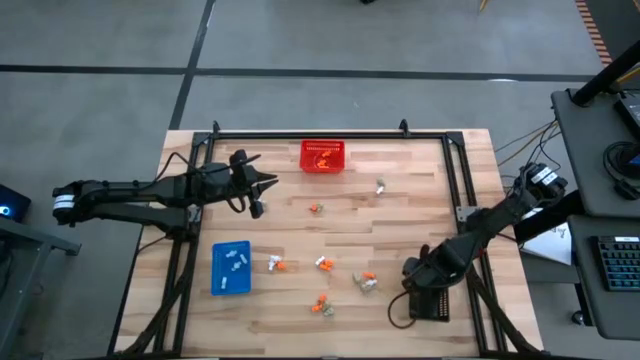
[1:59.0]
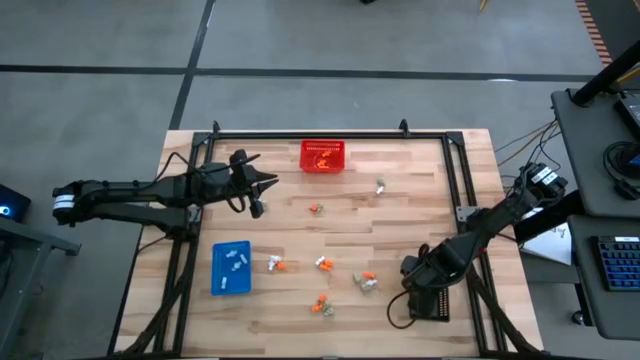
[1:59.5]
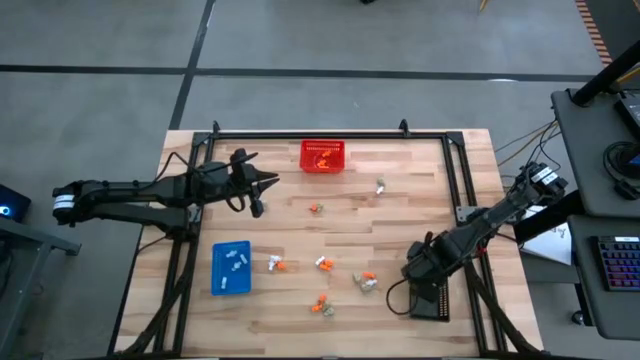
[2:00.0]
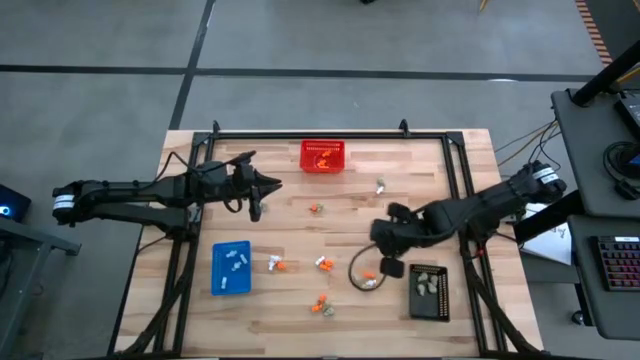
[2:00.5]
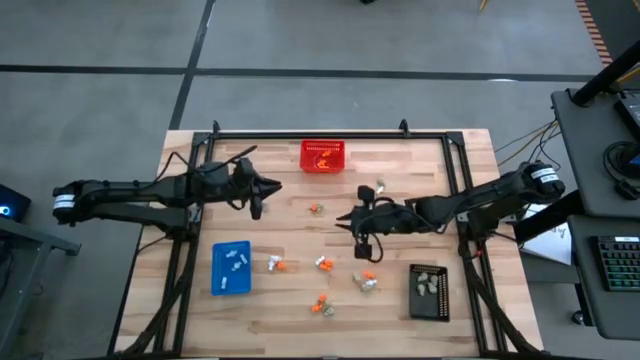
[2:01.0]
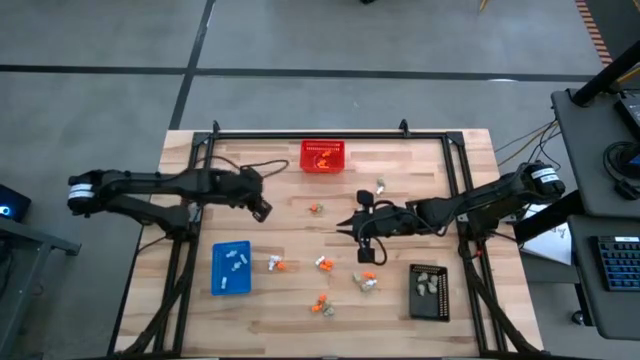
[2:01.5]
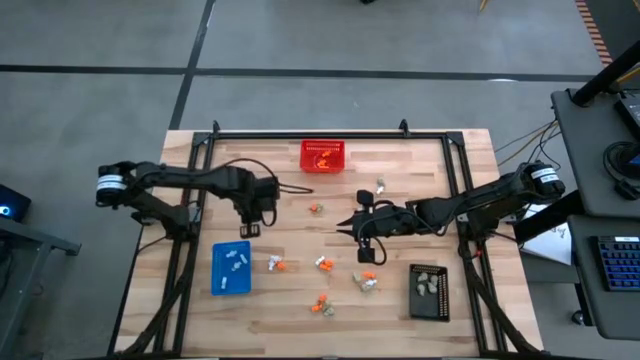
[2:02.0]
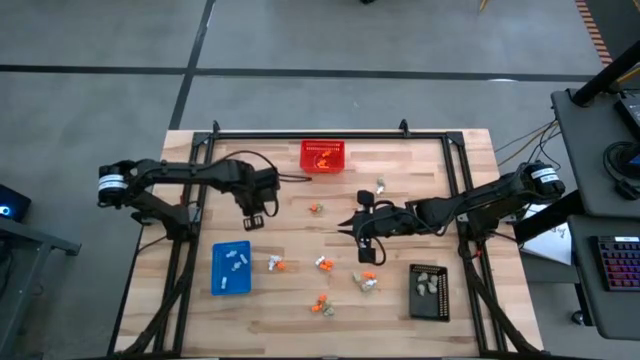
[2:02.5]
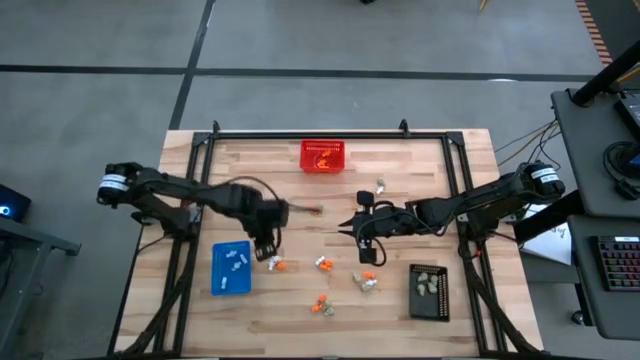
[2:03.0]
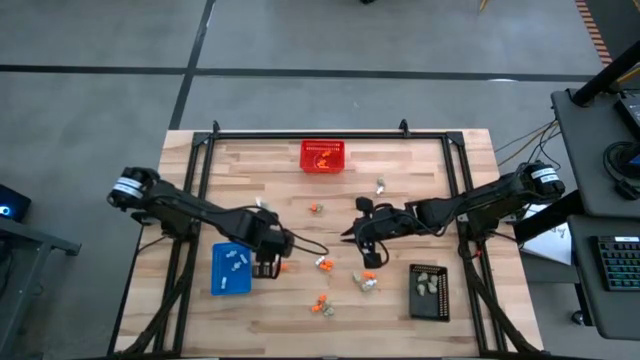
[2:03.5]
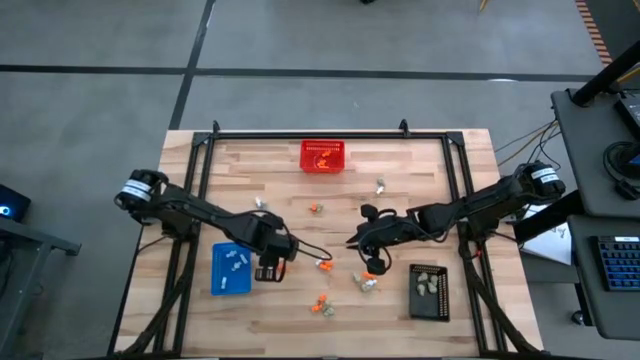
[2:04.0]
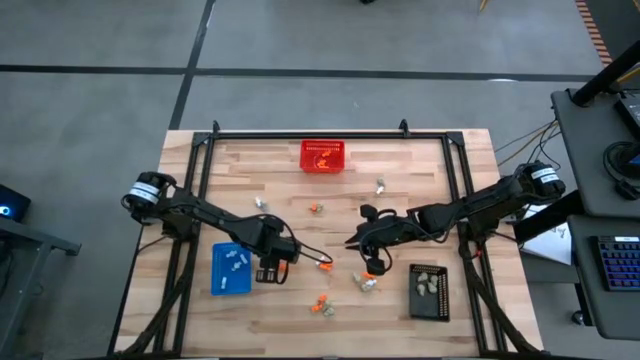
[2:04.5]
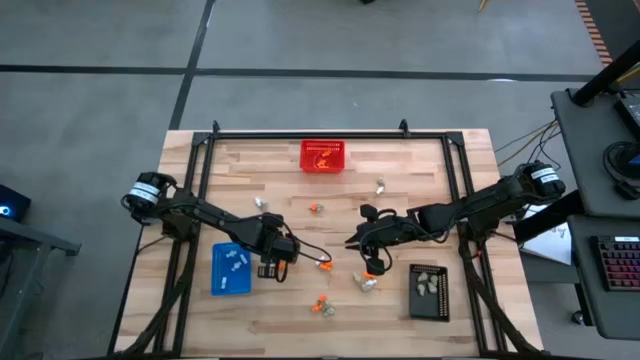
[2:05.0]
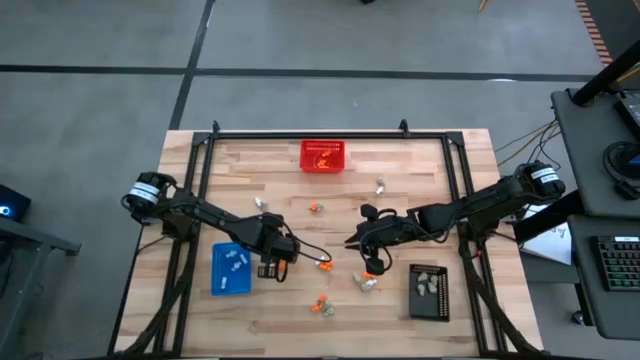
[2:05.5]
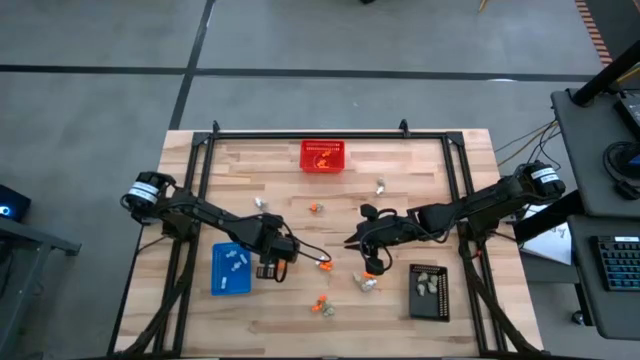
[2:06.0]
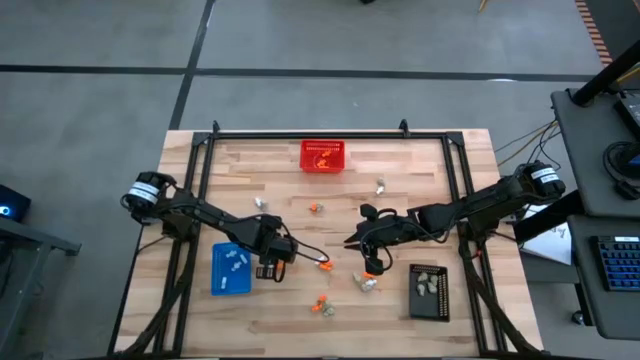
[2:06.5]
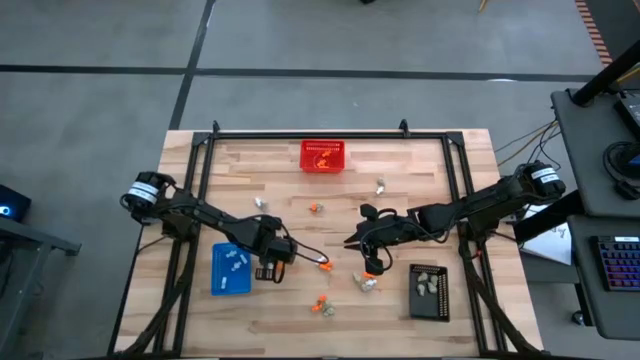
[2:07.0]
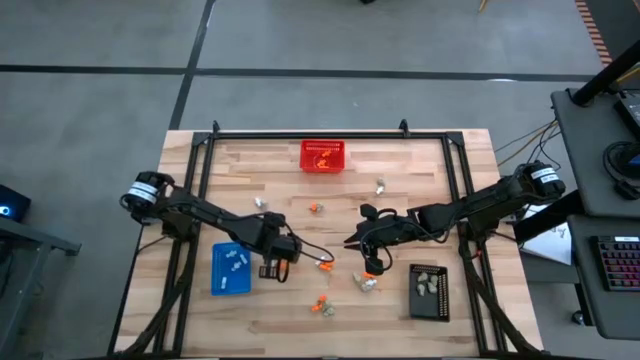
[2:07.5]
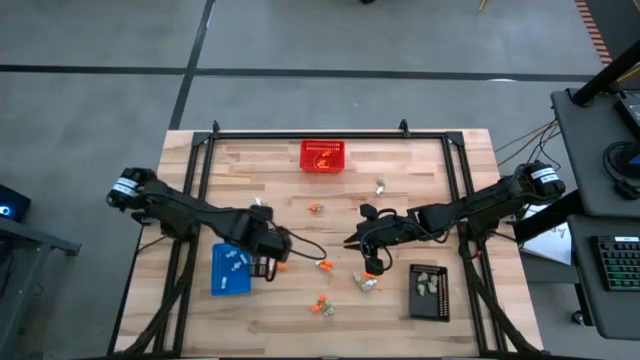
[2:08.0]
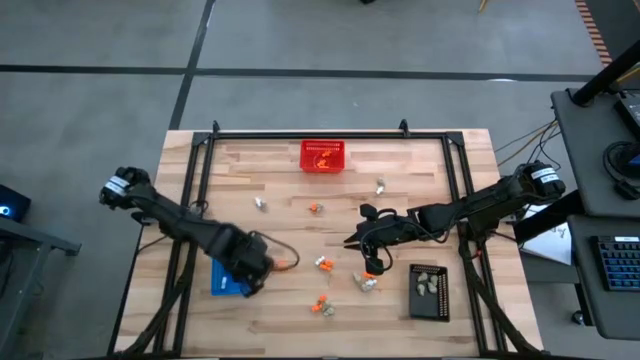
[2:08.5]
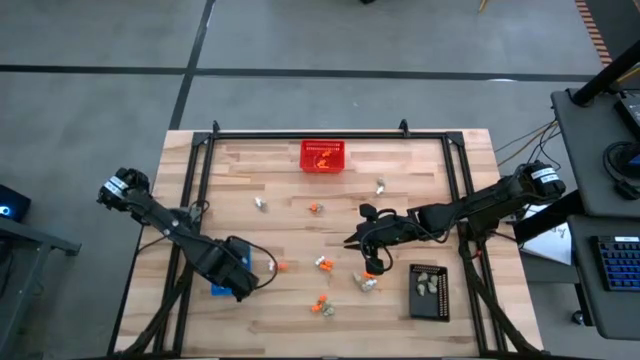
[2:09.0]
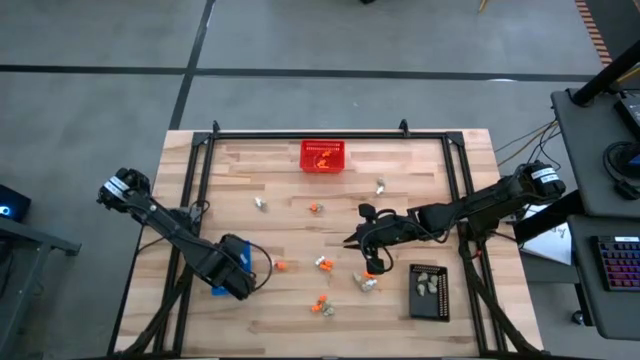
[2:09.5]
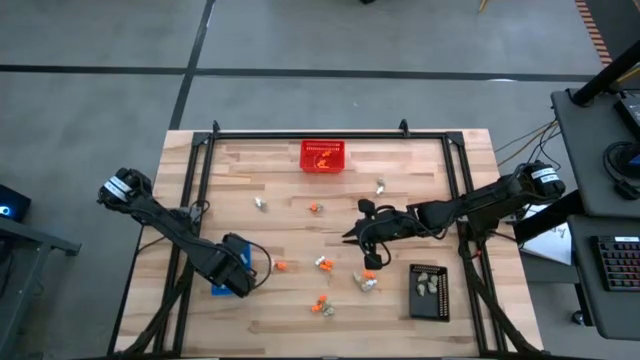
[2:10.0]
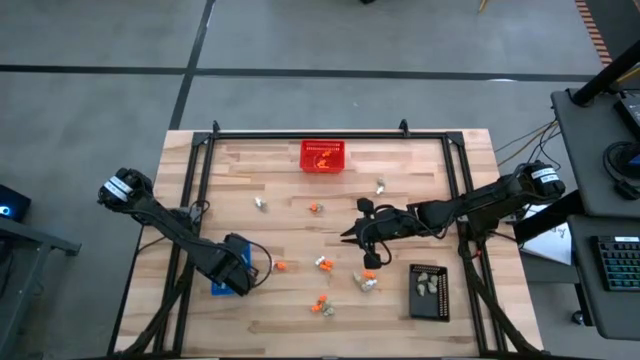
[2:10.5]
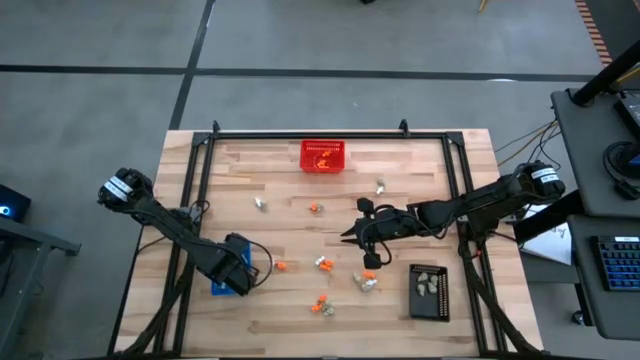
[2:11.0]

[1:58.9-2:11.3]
Task: Sort Halloween decoration
Put the white skeleton toy into the blue bin

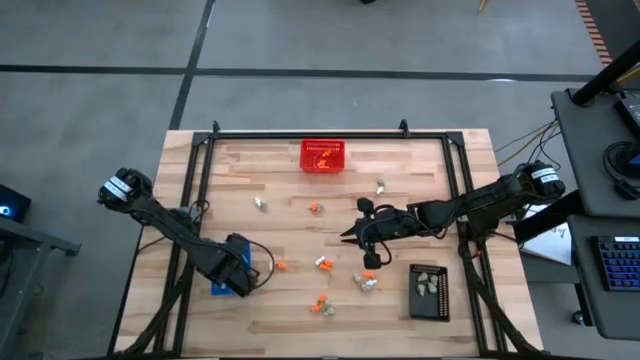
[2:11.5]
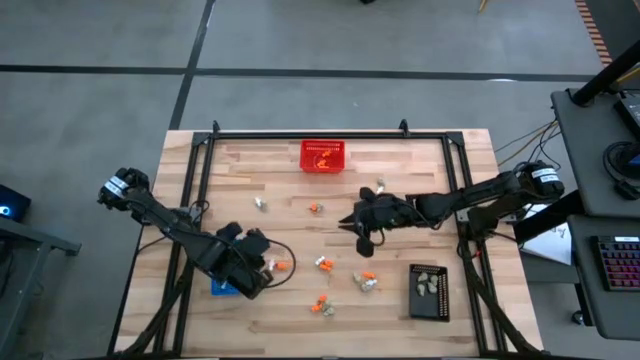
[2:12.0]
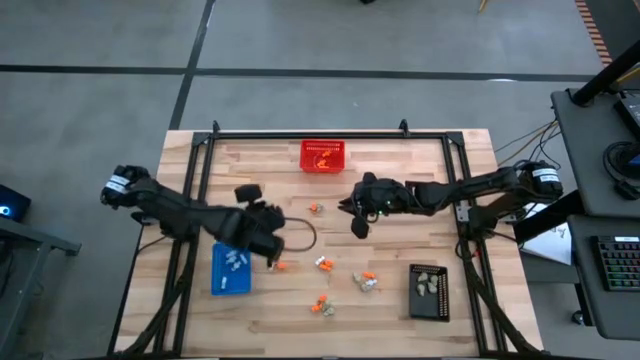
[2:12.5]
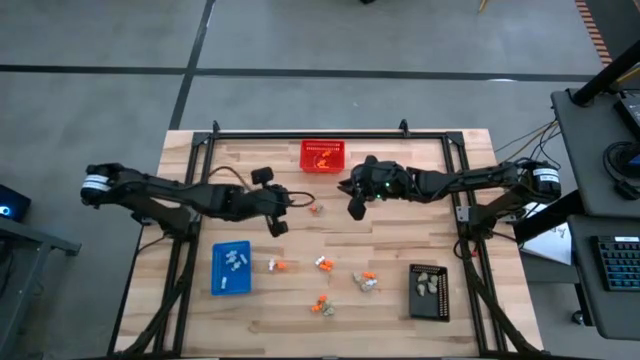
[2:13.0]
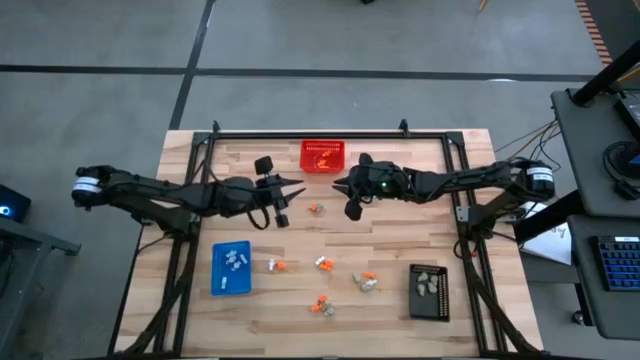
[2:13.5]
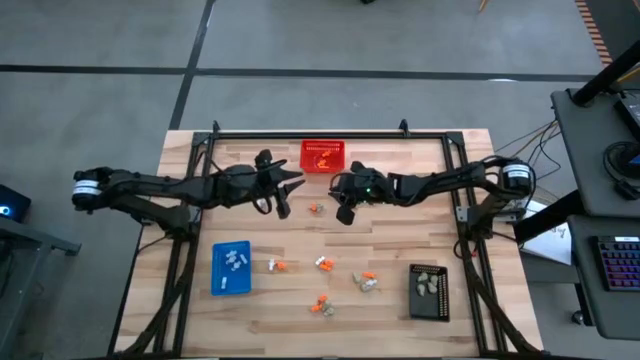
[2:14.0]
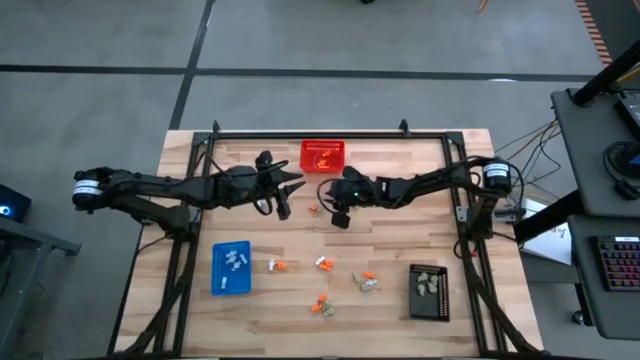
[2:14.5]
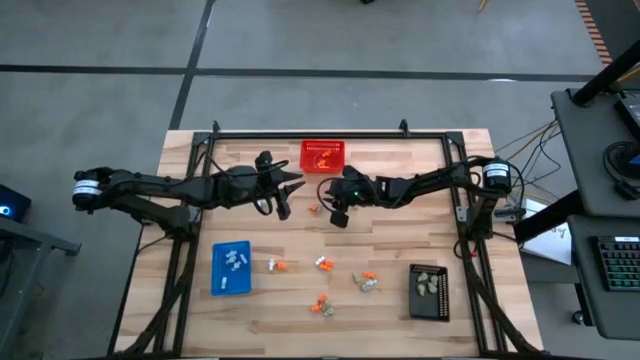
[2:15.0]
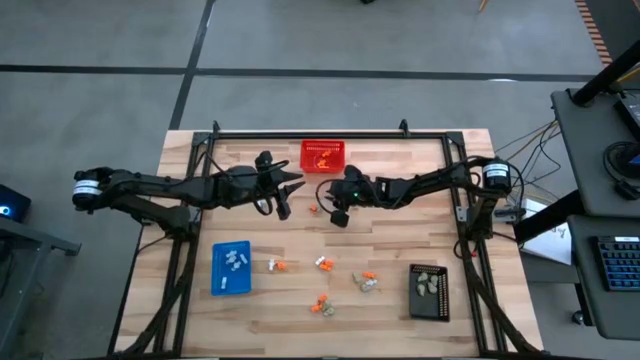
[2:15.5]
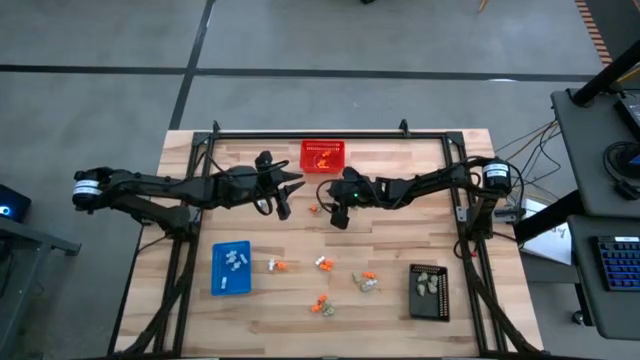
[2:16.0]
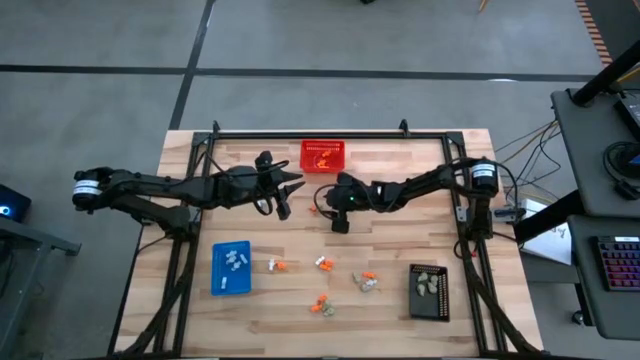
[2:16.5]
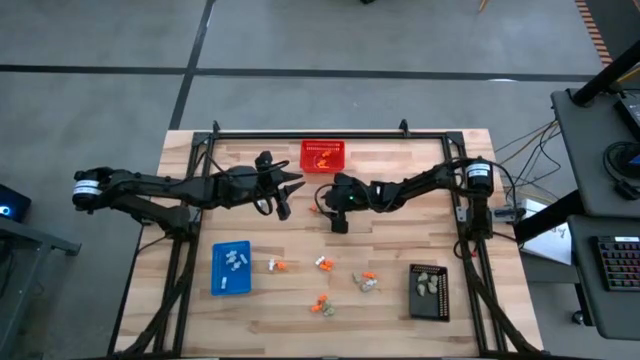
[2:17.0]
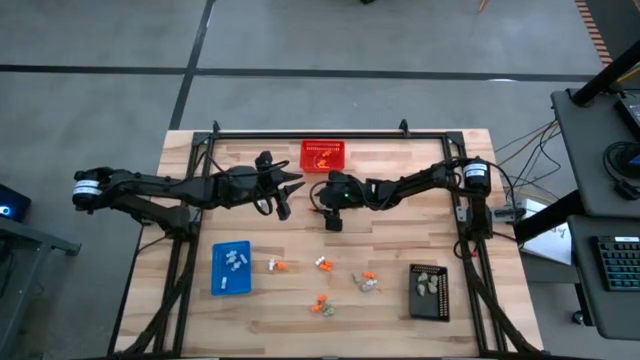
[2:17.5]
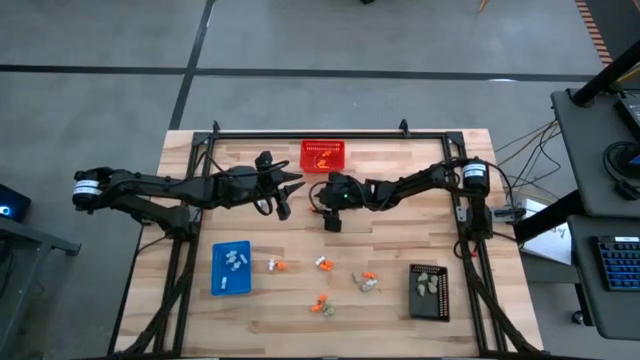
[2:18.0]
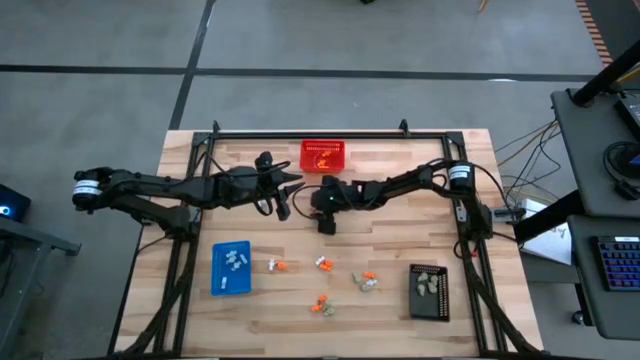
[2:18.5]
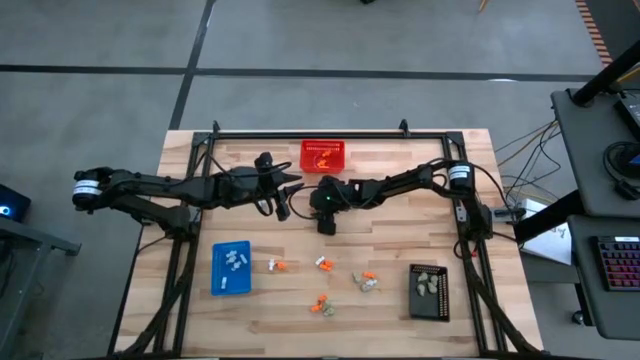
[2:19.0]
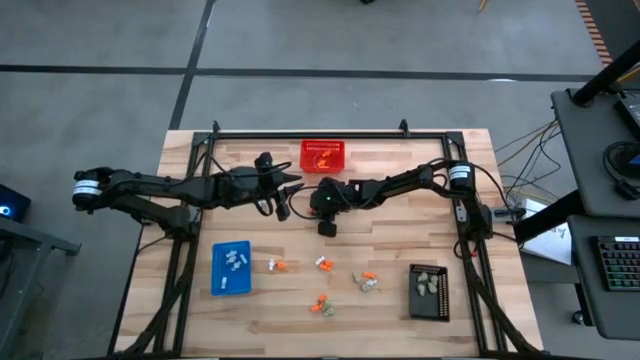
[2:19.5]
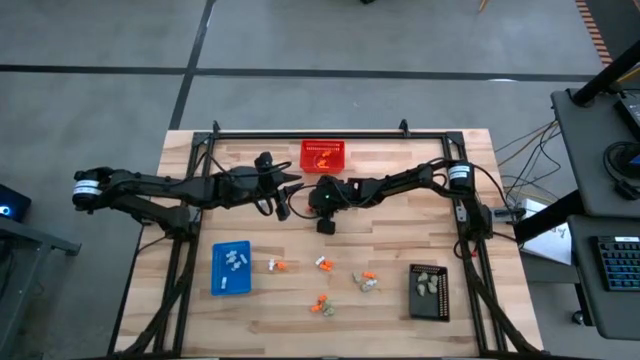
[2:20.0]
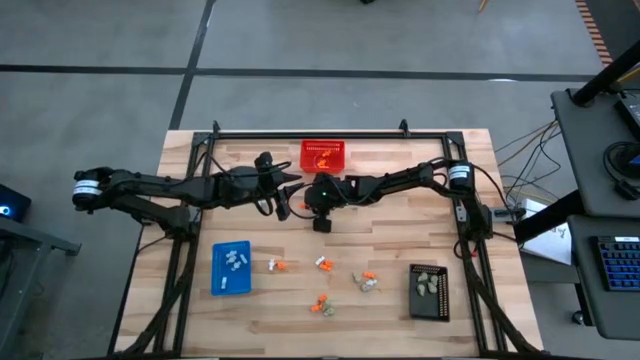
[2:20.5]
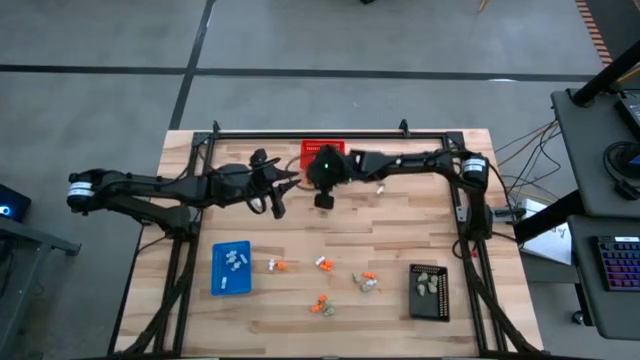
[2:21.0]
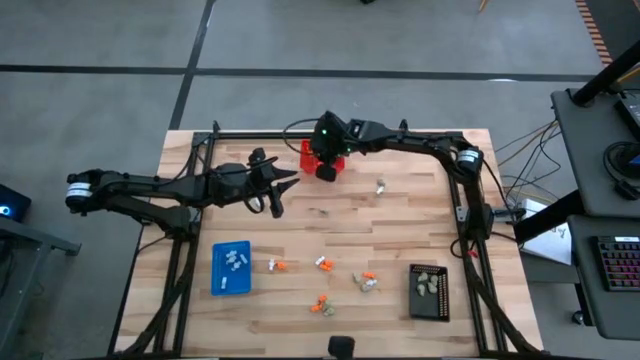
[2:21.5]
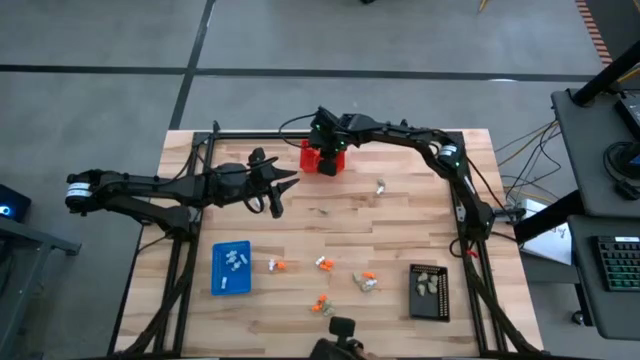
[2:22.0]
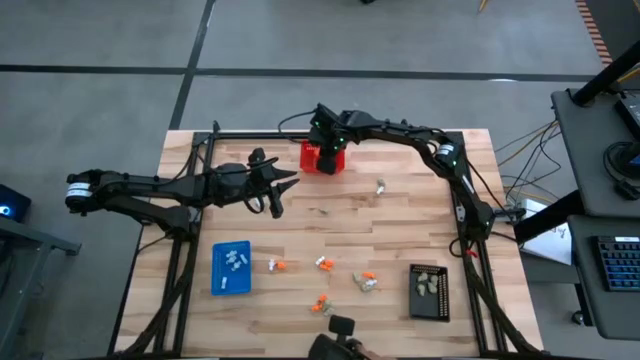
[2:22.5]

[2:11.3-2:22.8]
Put the orange skeleton toy into the red bin
